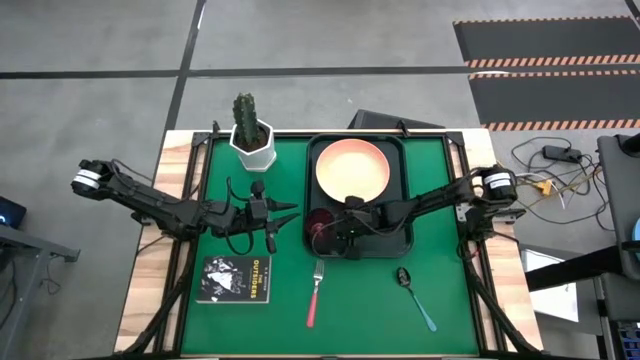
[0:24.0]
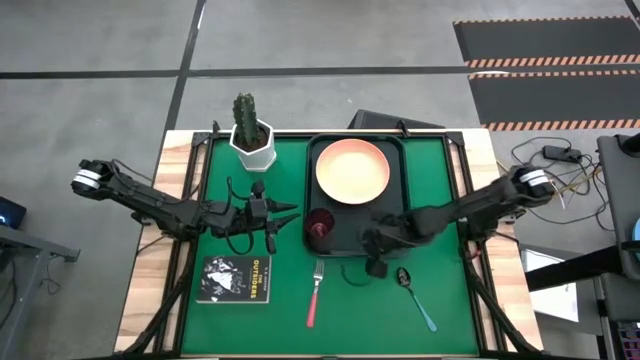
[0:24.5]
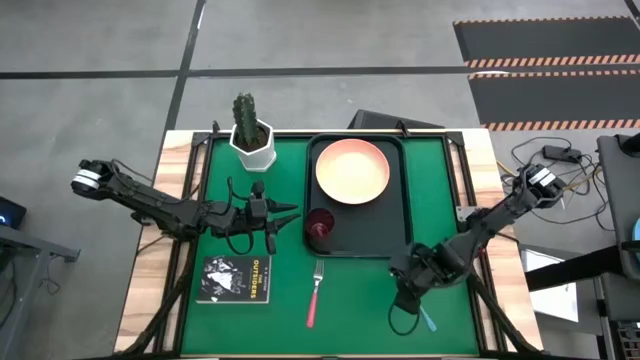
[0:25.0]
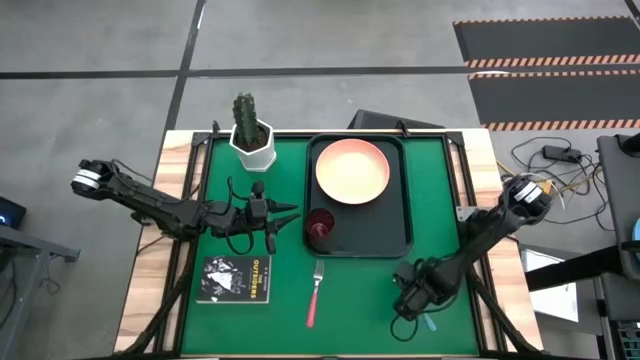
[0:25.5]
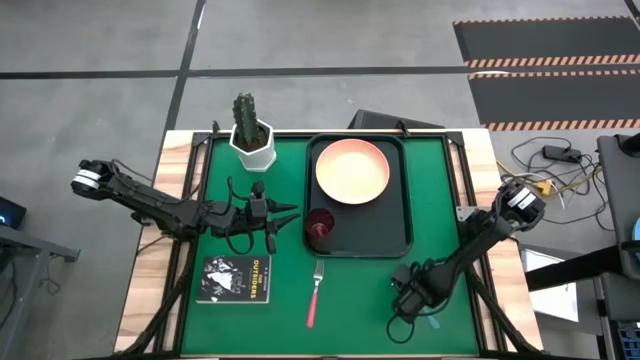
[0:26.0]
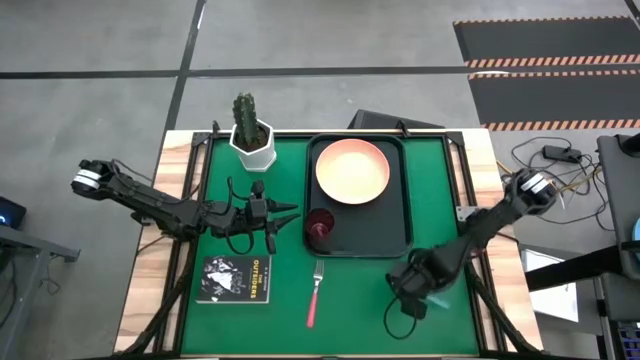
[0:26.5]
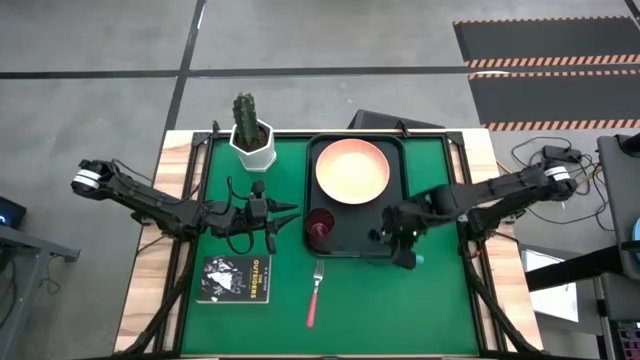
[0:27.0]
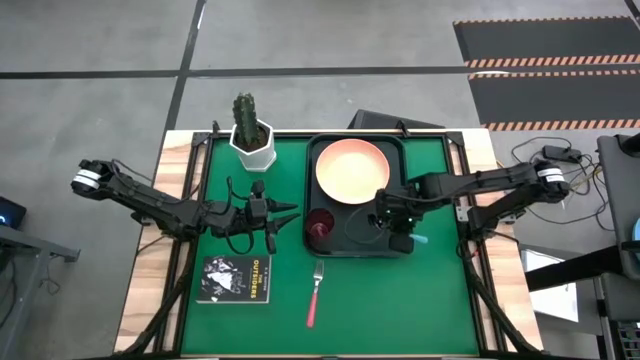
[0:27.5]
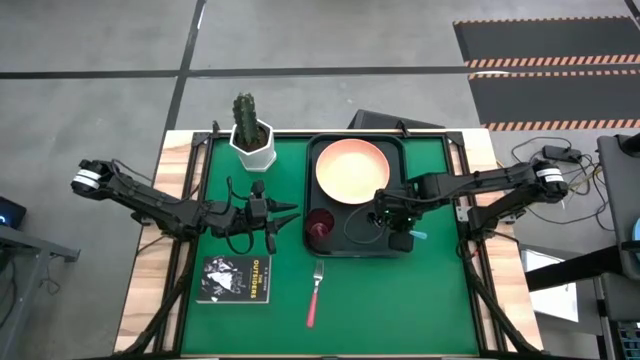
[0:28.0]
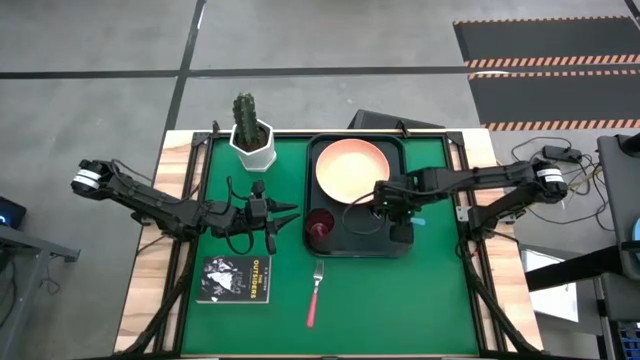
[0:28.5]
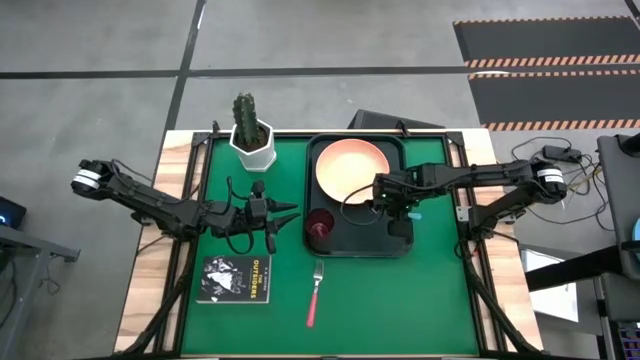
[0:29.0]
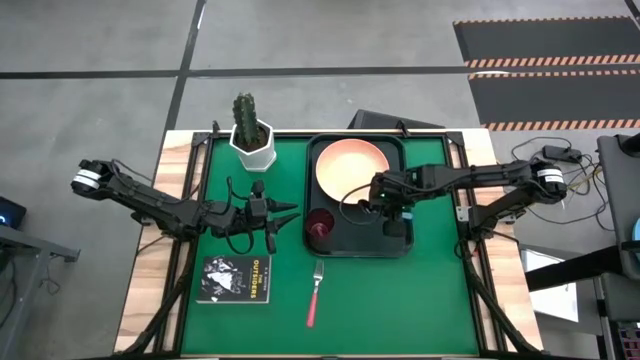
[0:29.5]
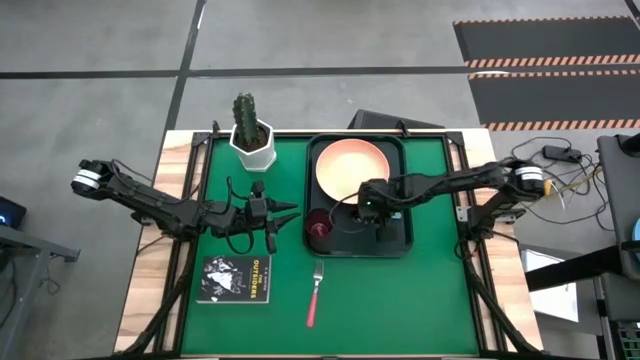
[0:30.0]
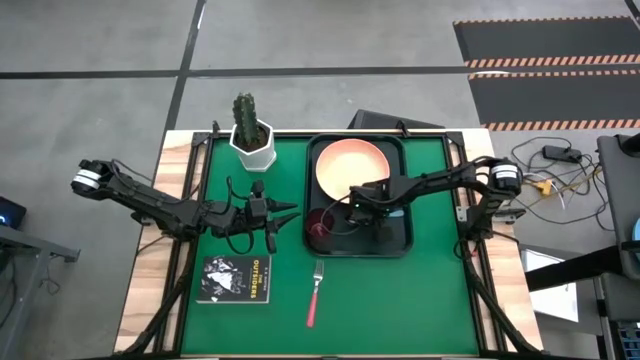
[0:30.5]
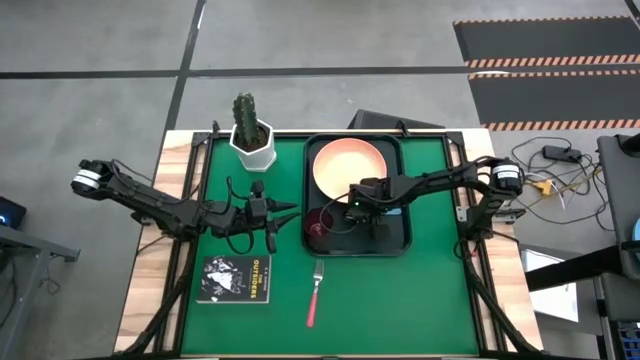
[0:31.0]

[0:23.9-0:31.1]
Task: Pick and place plate/cup/fork/spoon on tray
Put the blue spoon on the black serving tray to the left of the light orange plate

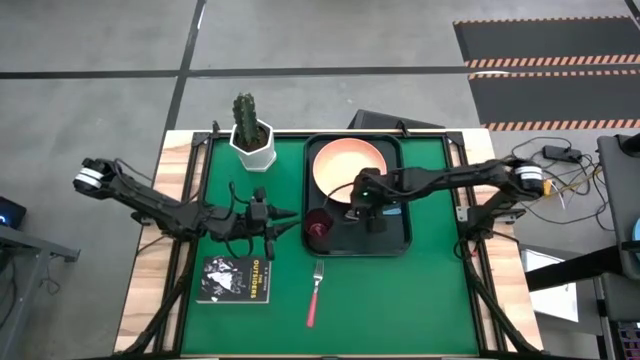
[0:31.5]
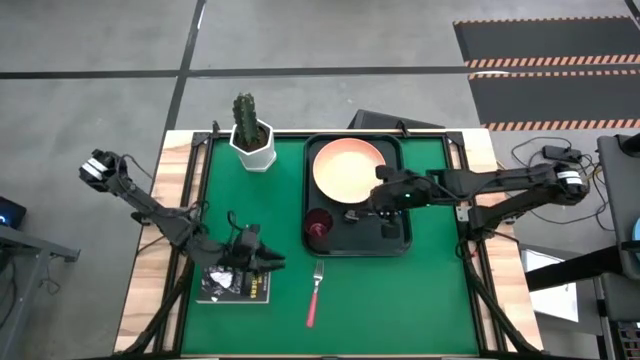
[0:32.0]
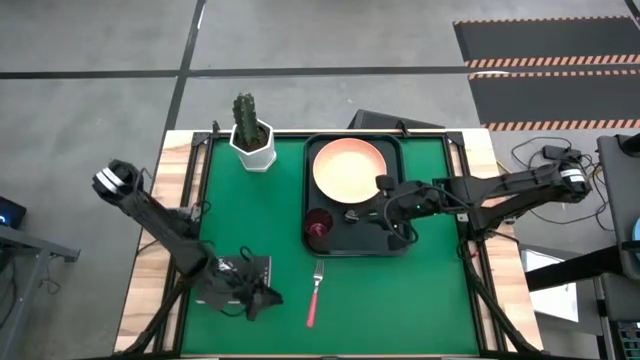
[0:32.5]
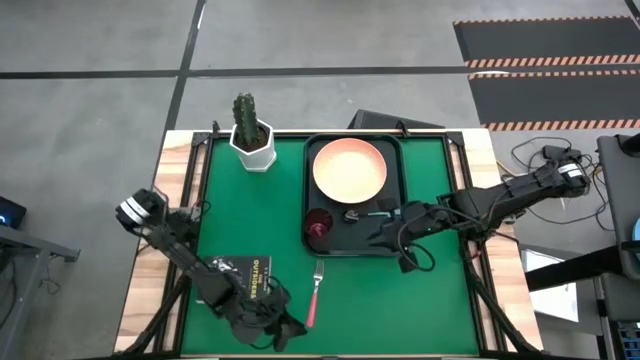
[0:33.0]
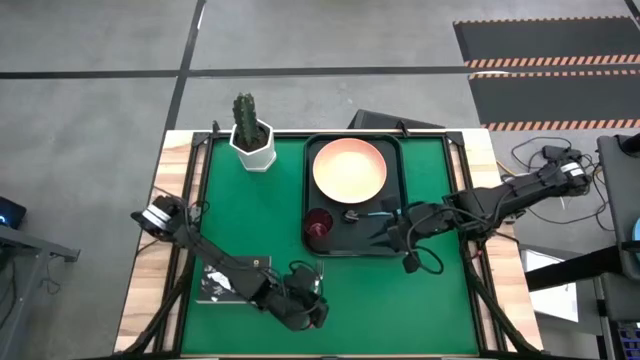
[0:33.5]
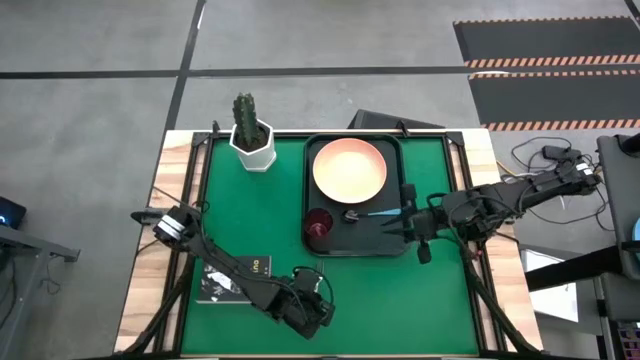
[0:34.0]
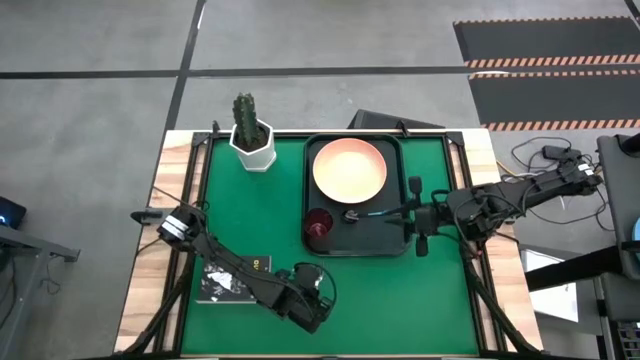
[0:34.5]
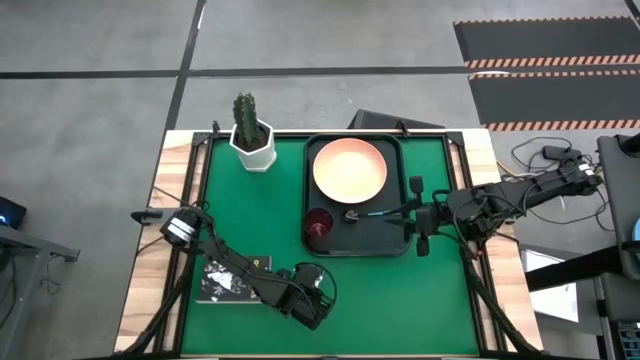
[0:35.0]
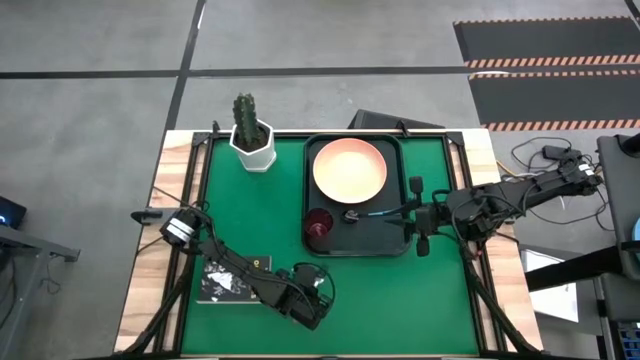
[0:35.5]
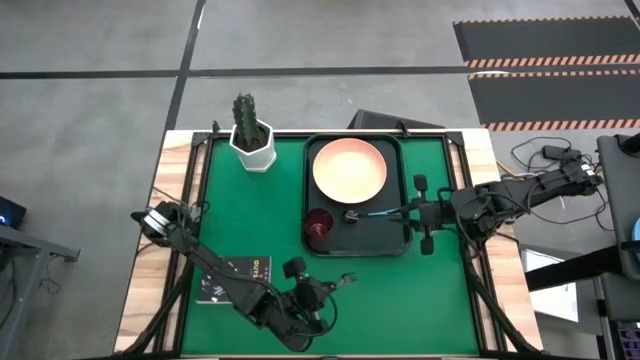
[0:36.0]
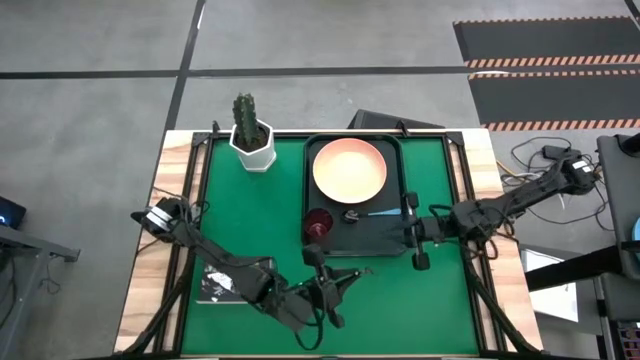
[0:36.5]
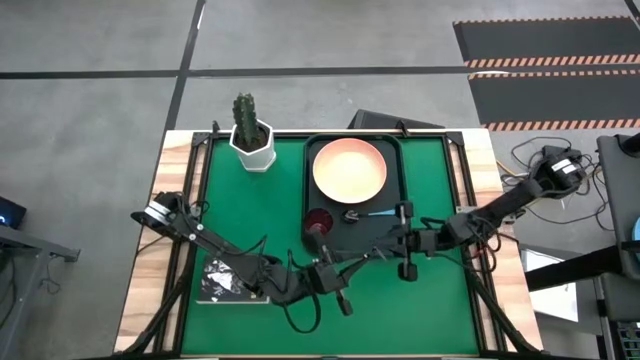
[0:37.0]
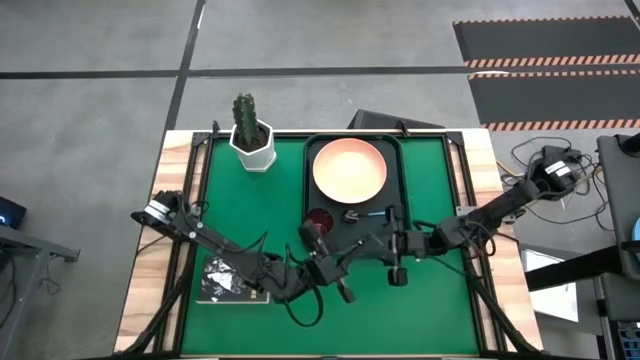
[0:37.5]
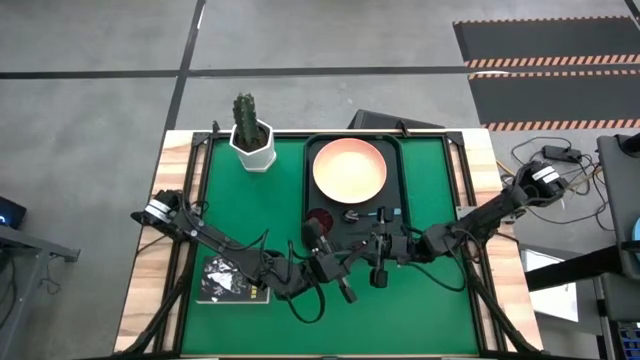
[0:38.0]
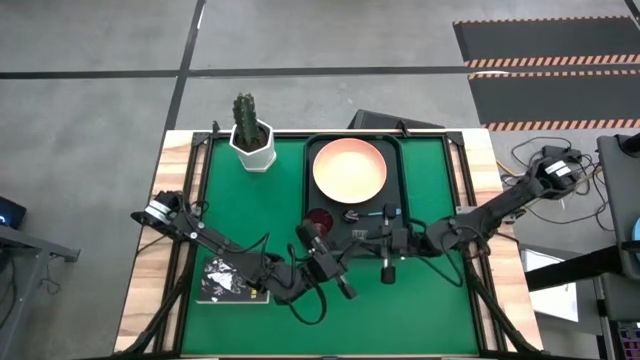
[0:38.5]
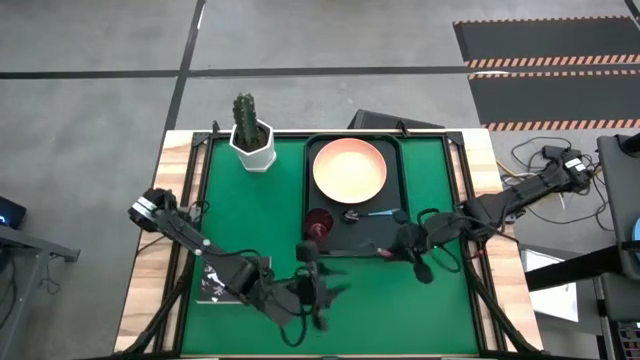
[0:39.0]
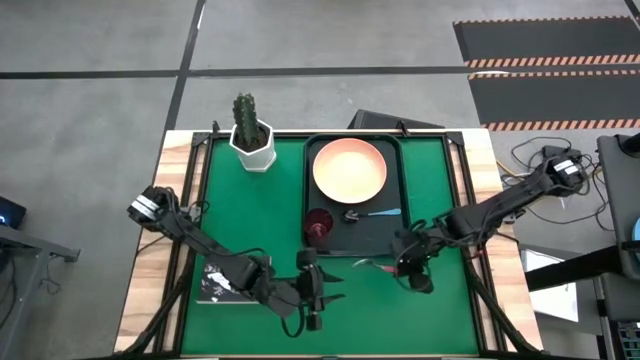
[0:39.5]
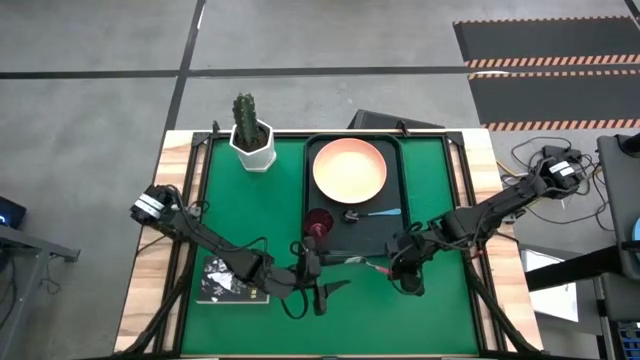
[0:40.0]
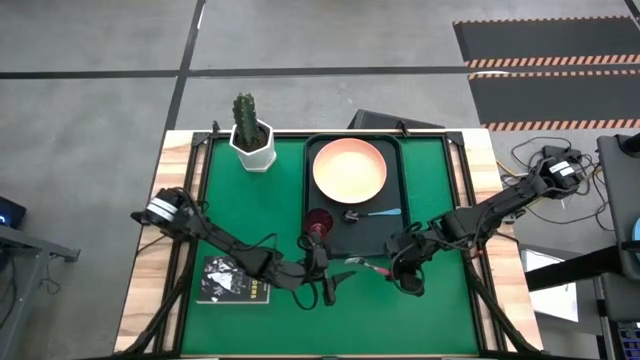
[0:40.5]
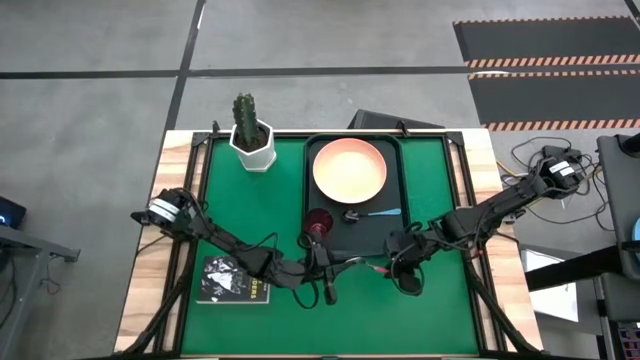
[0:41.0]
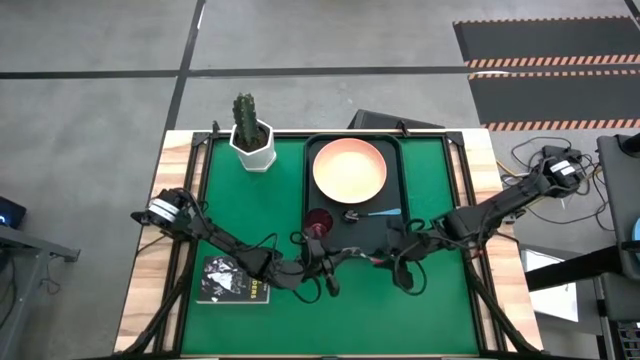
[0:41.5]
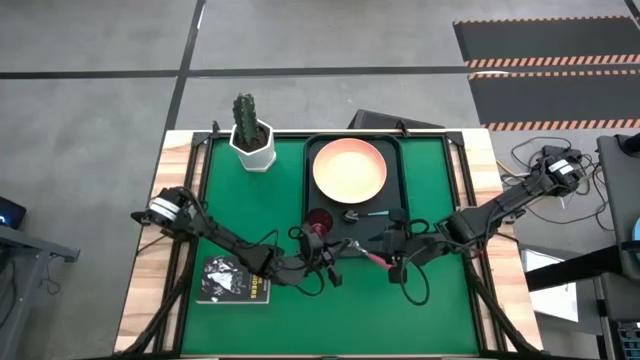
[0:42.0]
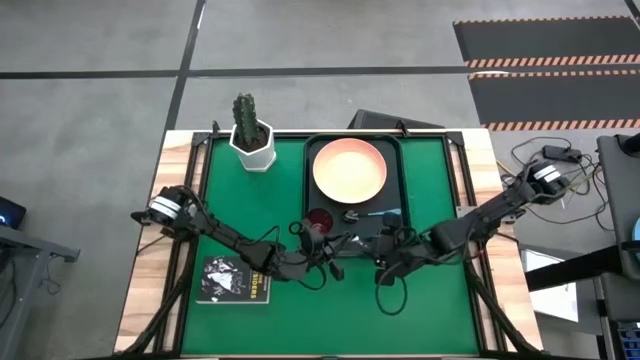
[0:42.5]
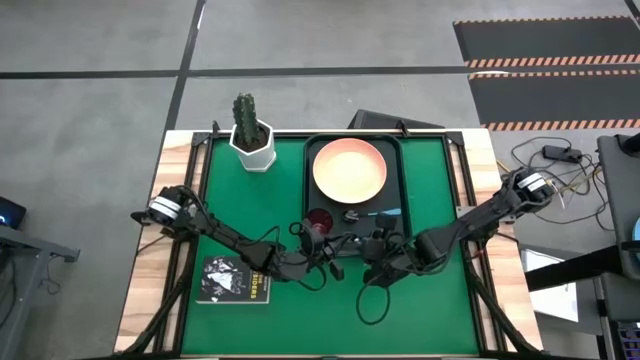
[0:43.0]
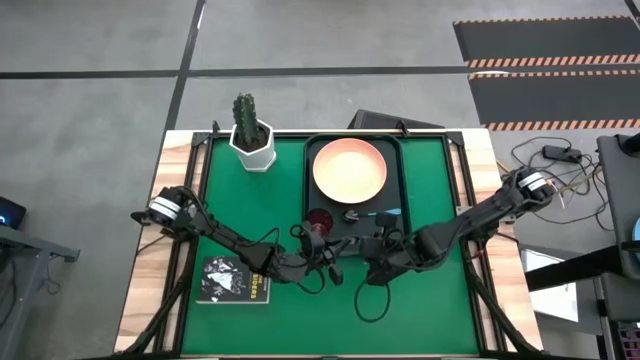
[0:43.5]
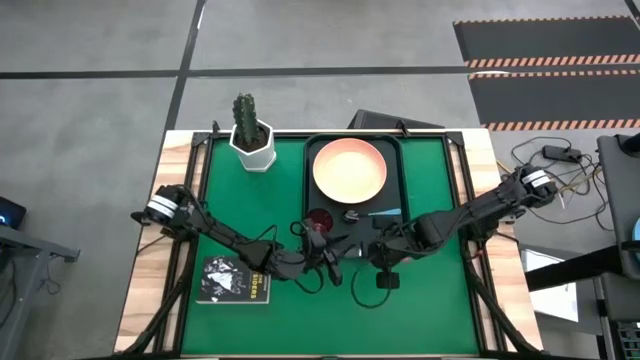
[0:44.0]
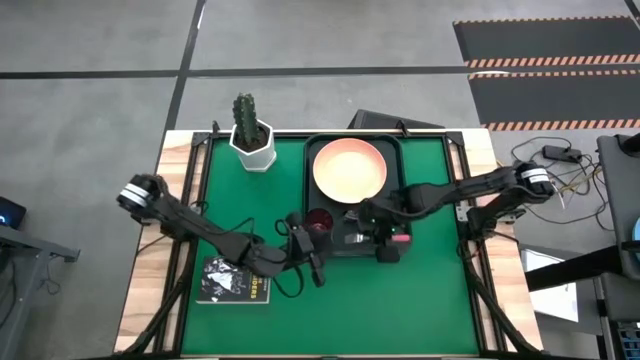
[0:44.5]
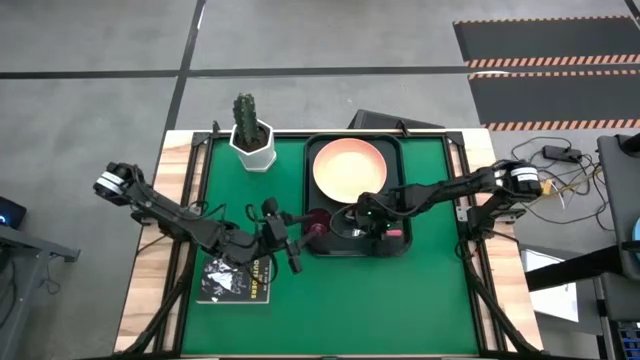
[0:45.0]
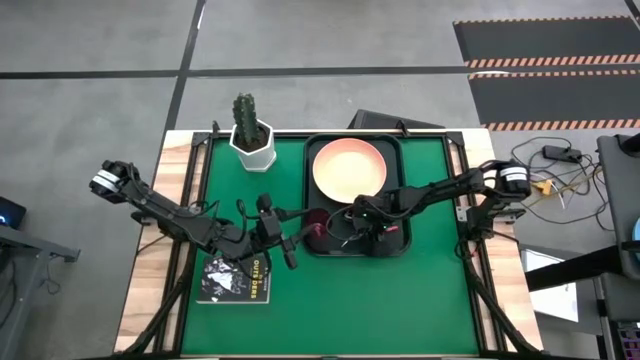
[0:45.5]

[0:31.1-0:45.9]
Put the pink fork on the black serving tray to the left of the blue spoon

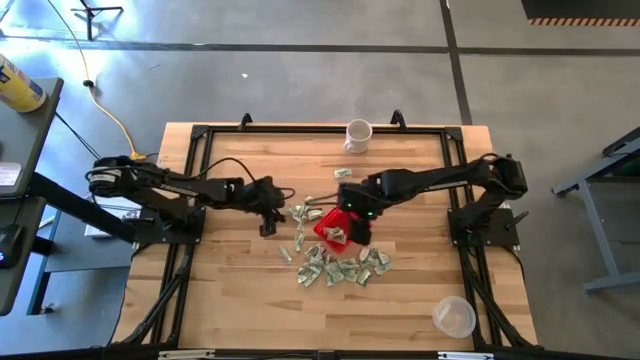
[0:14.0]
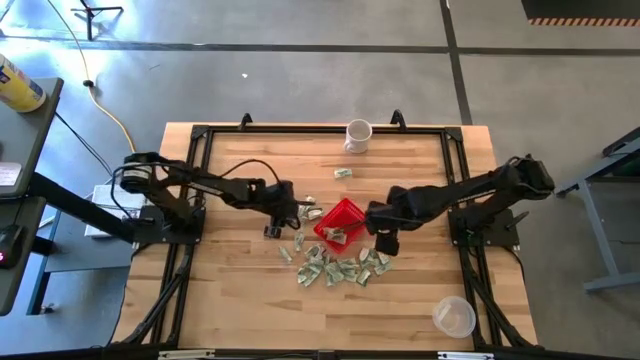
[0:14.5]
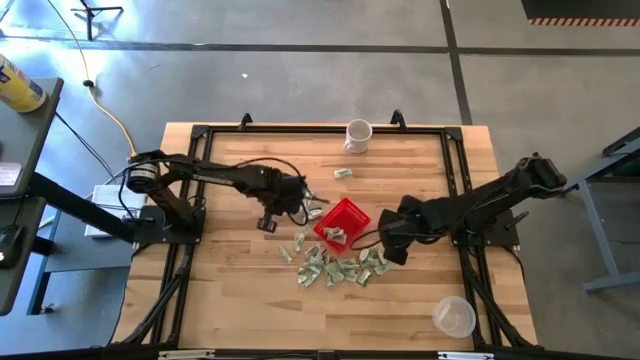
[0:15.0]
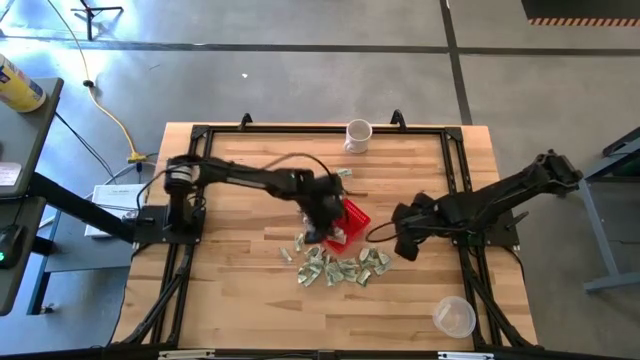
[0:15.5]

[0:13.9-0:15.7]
Task: Pick and place items into bin
Put the white stevia packet into the red bin
